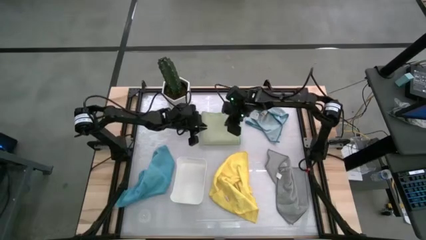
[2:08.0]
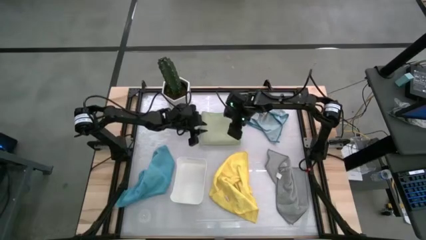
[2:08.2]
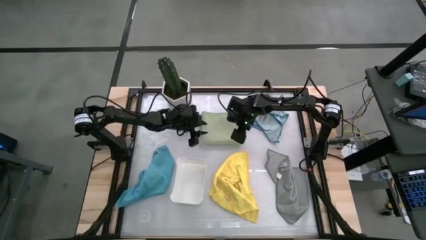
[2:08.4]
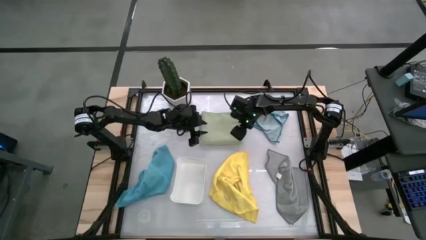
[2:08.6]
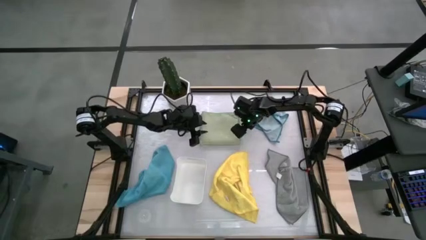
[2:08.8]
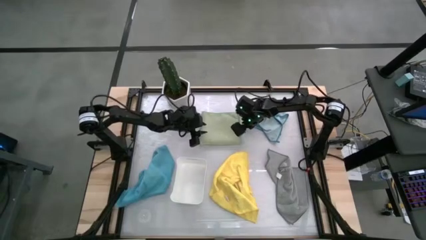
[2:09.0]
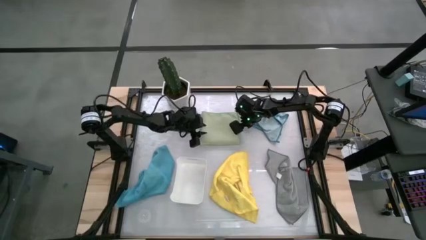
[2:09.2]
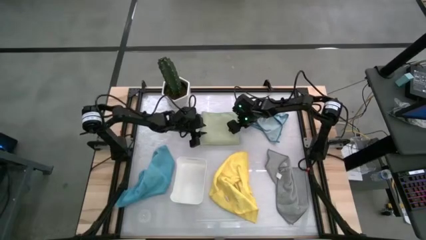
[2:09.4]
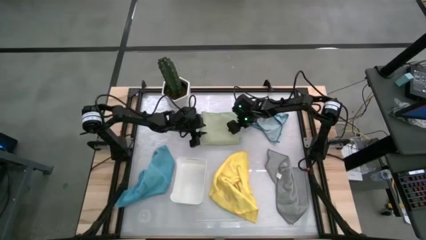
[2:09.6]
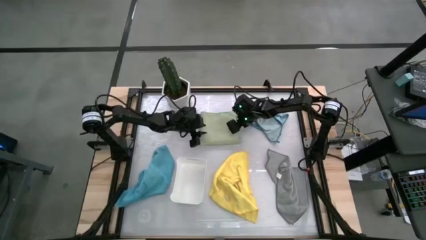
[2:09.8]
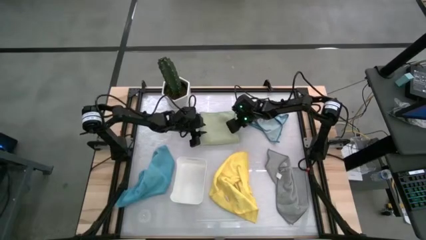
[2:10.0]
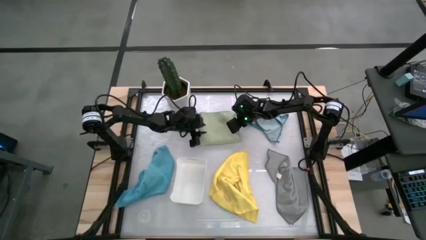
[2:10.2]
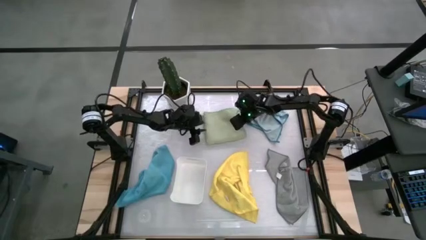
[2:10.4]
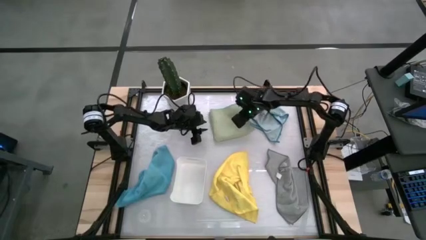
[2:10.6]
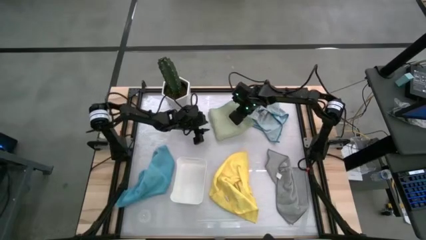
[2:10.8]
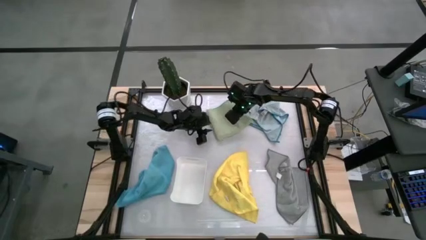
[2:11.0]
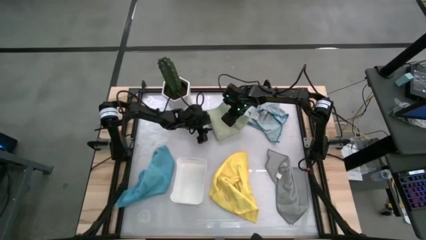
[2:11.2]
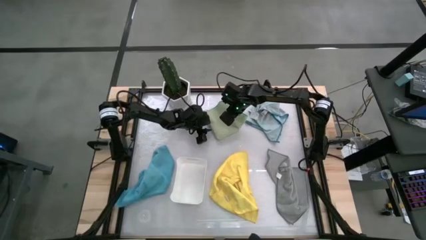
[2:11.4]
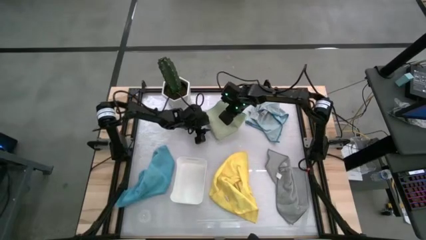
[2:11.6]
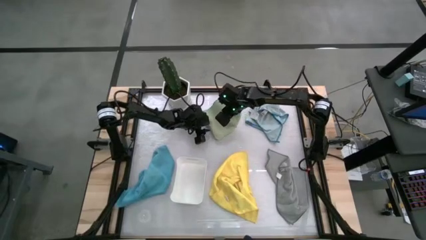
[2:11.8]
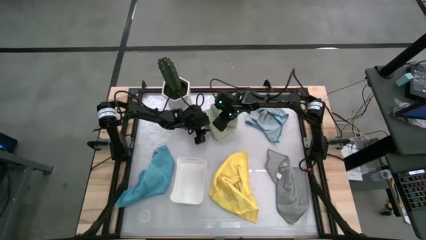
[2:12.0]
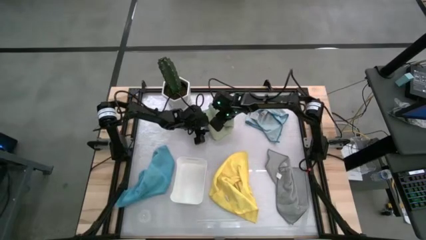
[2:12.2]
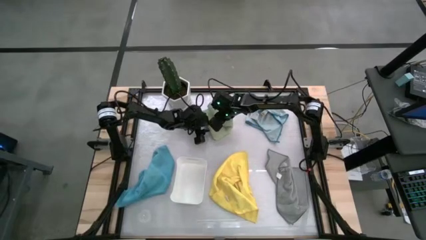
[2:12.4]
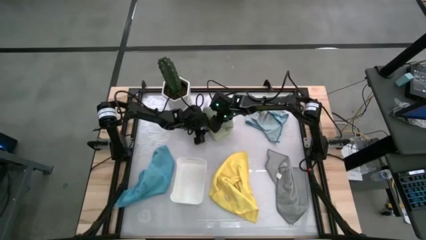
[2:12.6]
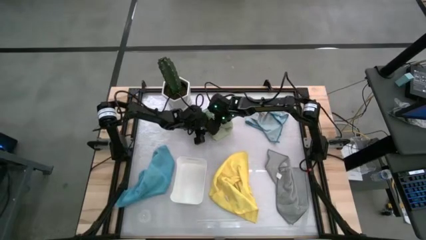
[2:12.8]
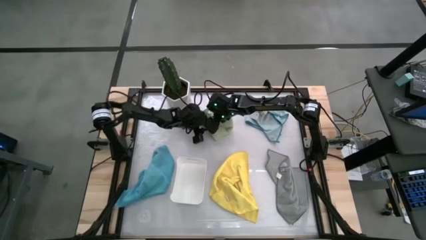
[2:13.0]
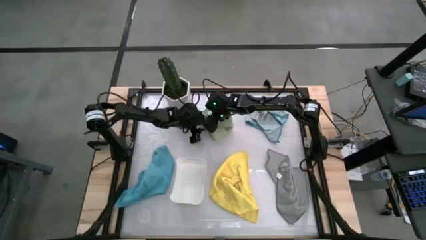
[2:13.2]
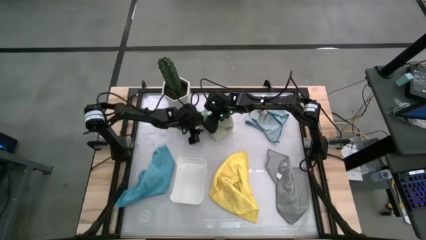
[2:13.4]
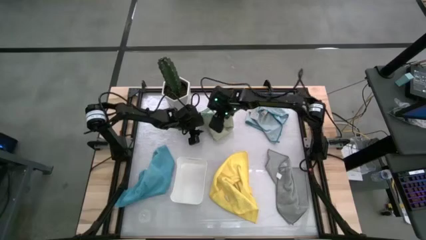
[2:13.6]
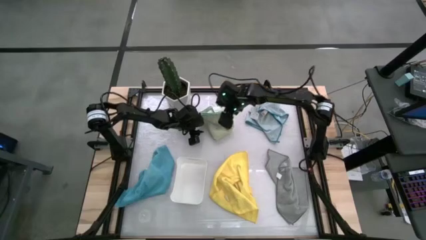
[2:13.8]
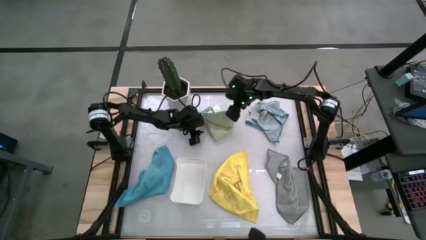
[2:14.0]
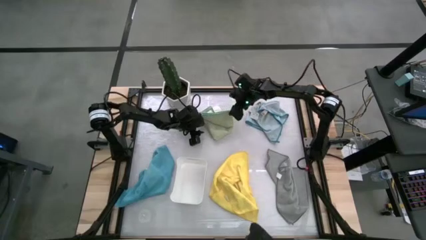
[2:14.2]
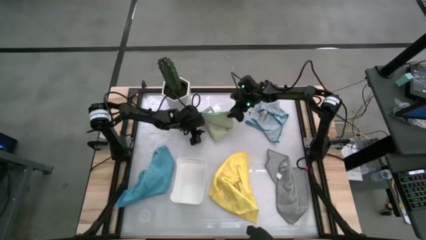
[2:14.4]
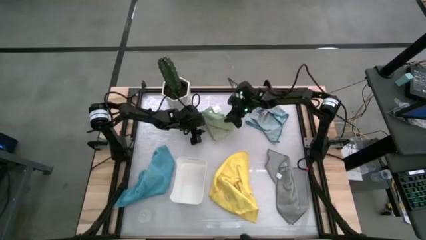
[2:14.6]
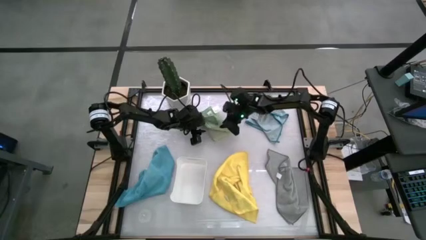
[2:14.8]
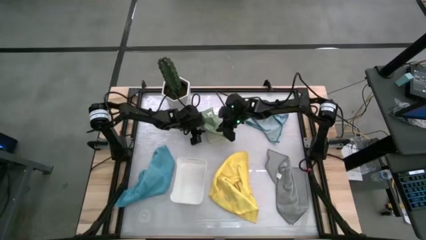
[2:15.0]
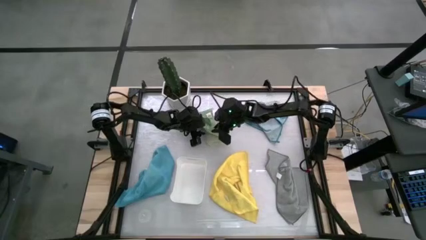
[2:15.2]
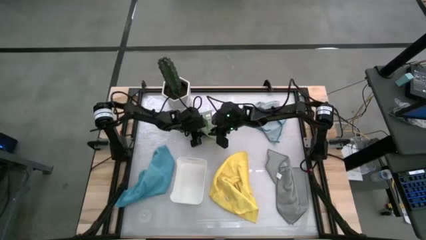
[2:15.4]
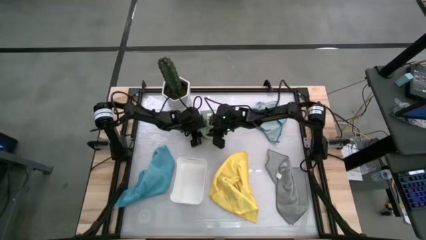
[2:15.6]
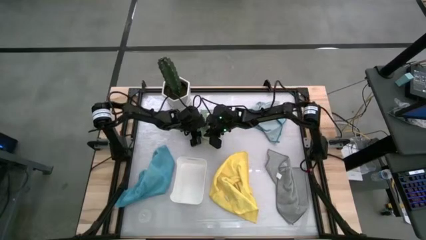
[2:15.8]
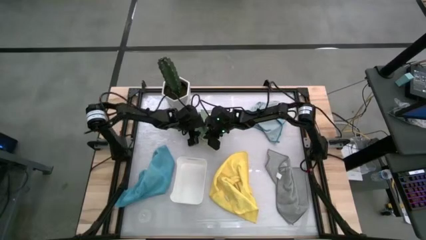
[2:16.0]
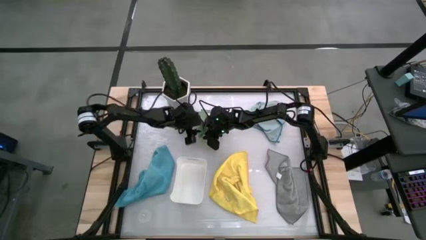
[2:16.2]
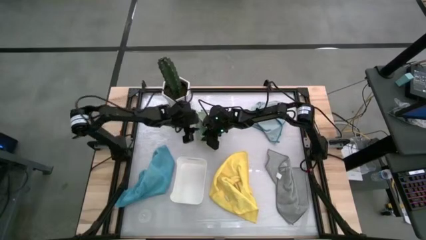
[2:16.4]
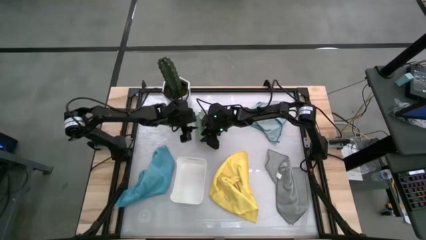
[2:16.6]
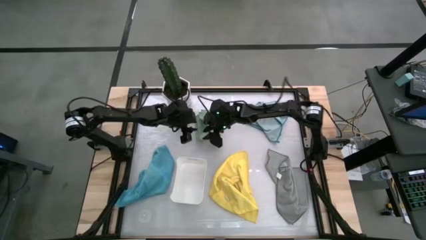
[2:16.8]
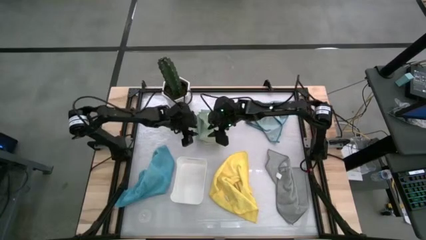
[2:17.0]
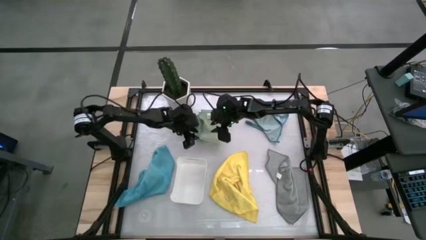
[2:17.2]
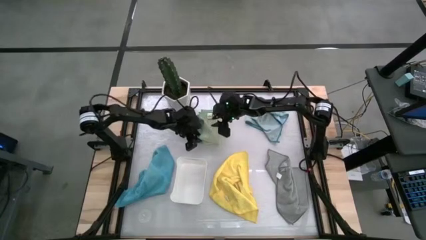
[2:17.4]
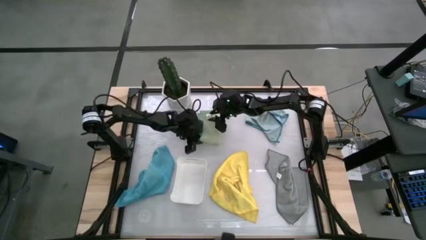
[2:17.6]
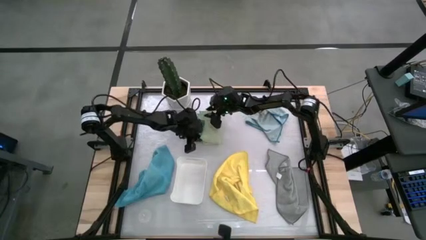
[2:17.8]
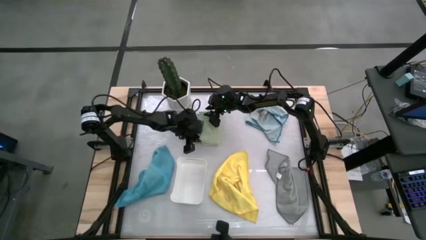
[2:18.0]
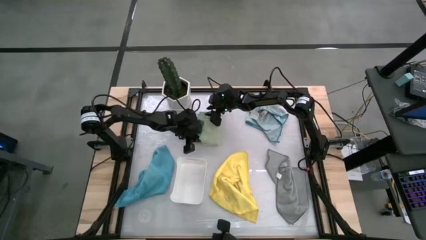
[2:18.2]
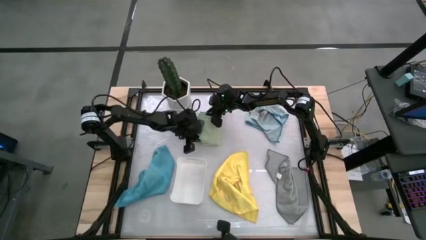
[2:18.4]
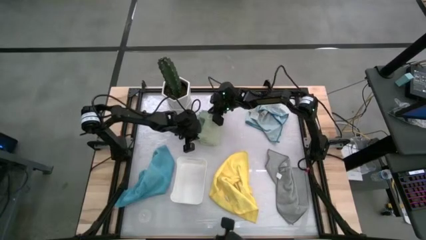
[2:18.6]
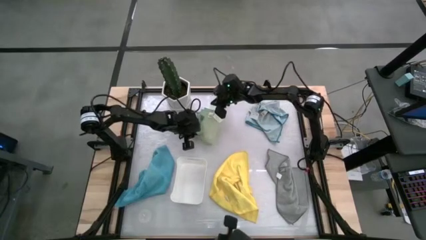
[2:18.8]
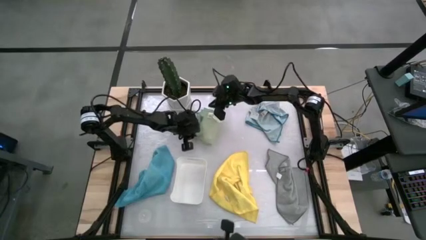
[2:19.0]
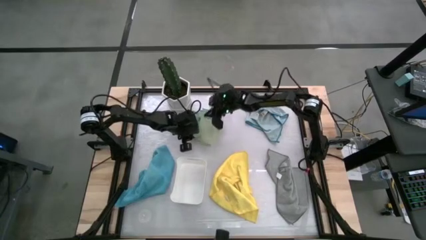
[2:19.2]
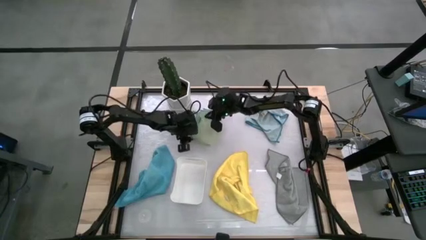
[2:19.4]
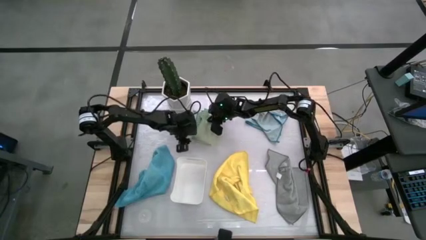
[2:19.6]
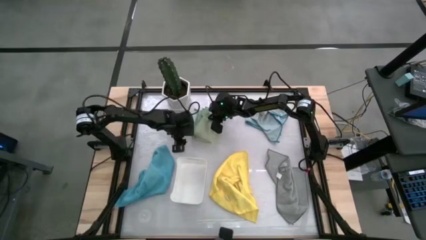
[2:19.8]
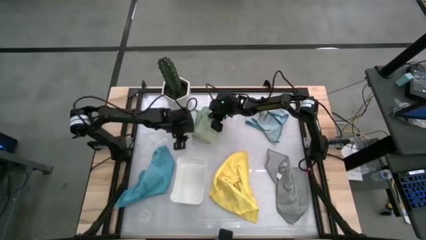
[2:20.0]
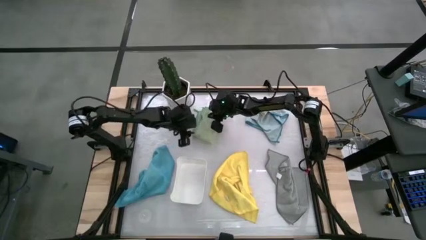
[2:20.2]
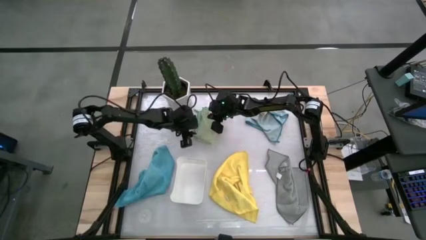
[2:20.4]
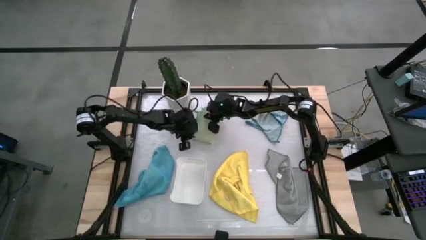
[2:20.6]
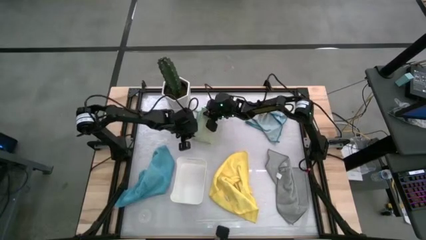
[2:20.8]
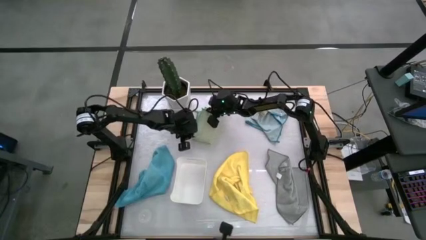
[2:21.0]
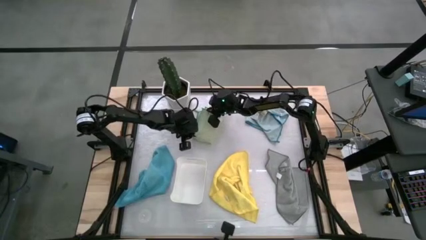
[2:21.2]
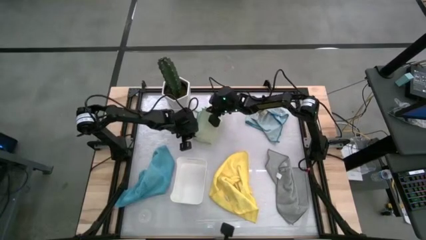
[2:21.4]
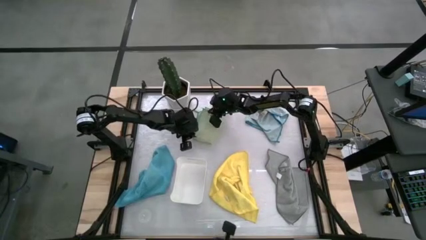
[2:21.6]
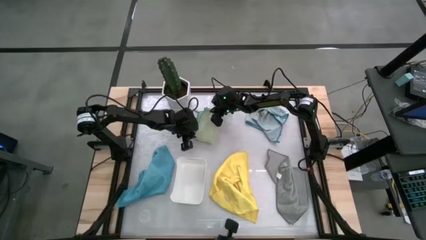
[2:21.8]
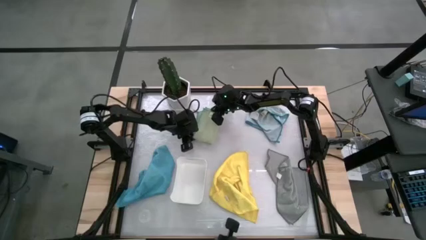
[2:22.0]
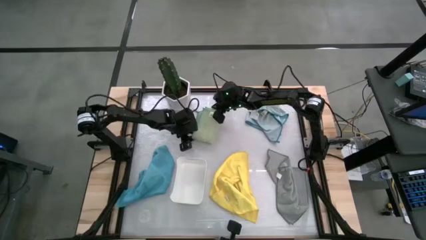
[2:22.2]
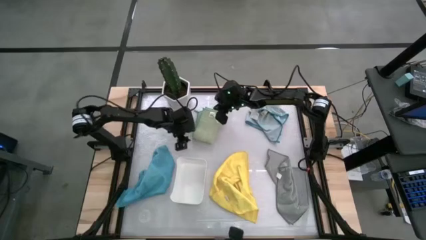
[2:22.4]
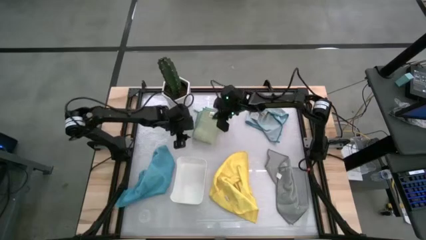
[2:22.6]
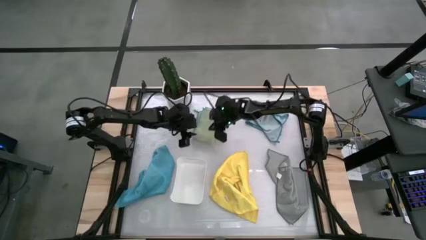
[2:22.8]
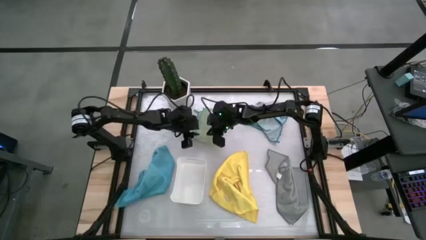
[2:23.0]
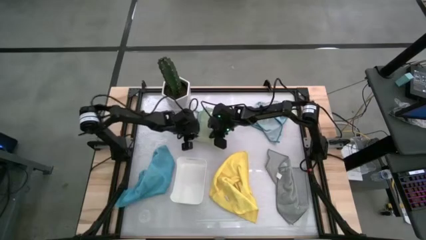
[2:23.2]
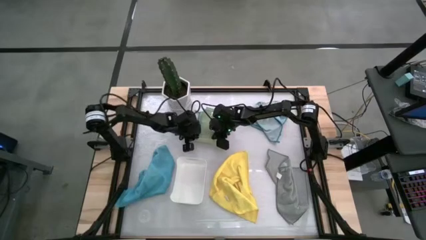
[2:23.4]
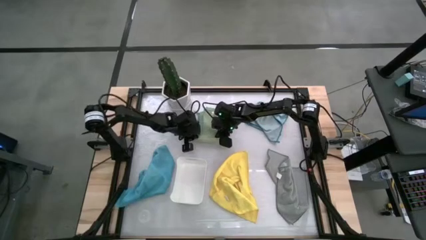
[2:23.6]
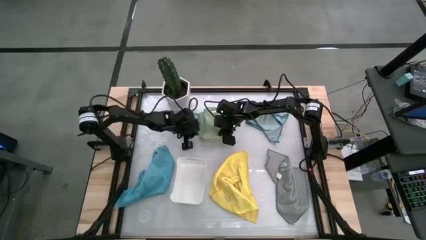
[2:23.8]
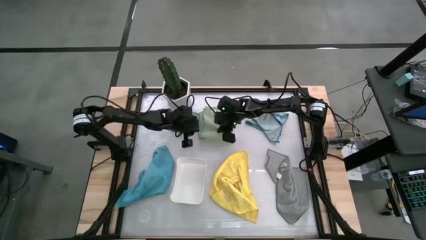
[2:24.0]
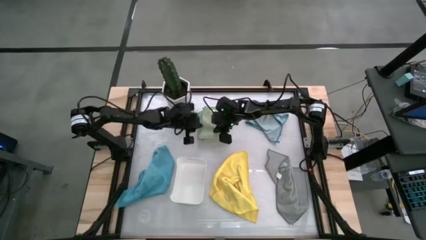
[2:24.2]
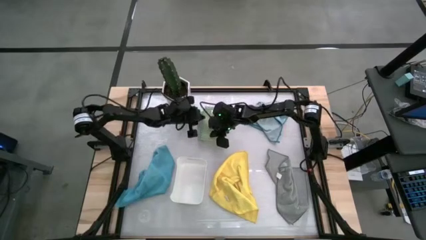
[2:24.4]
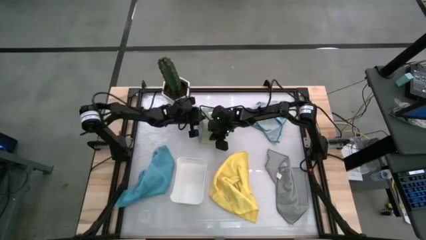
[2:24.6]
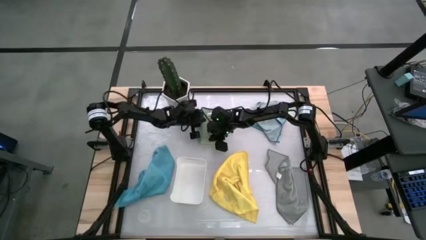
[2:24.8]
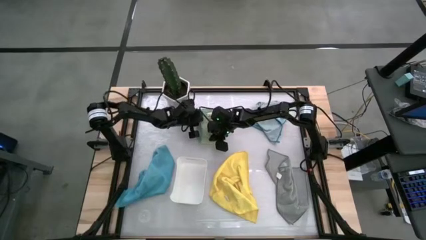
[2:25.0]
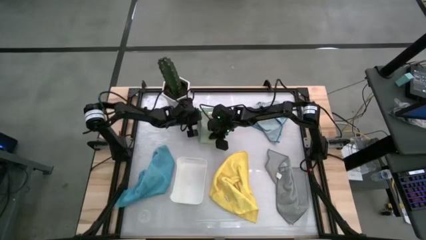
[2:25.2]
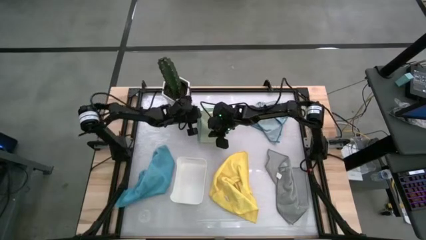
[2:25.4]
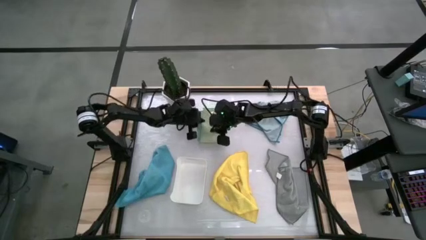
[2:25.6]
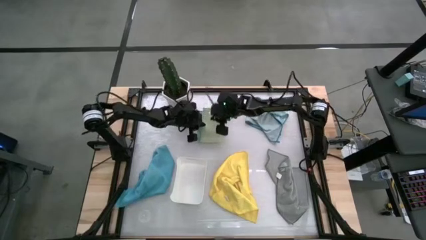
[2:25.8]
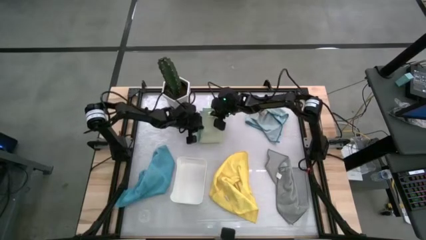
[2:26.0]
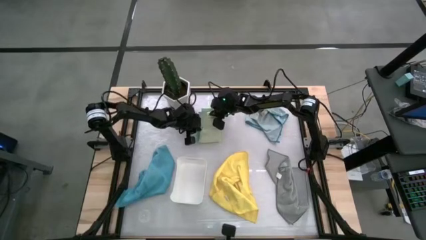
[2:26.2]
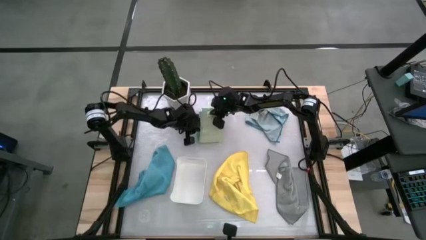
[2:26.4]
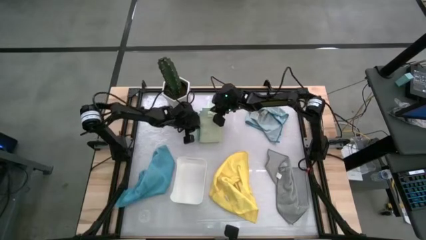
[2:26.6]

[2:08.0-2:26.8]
Task: Fold microfiber towels
Fold the green microfiber towel
